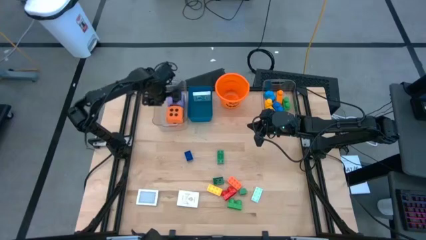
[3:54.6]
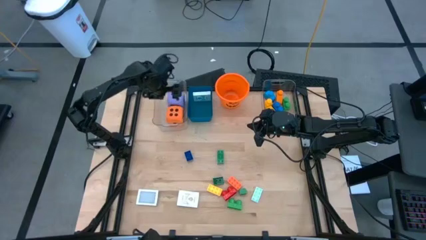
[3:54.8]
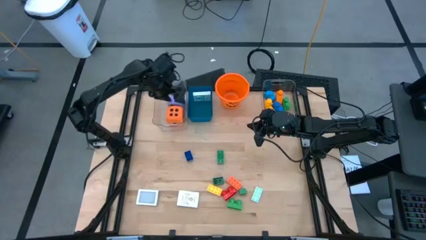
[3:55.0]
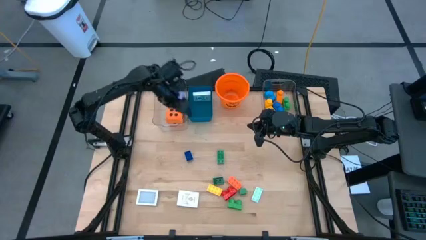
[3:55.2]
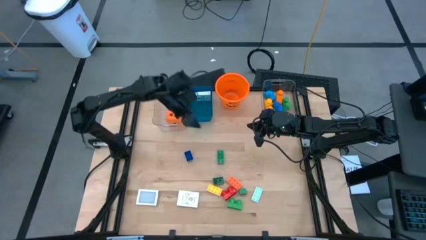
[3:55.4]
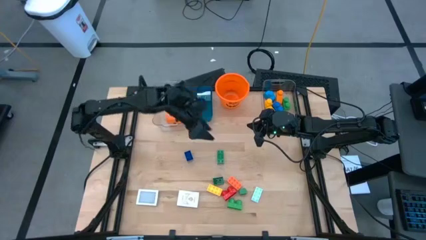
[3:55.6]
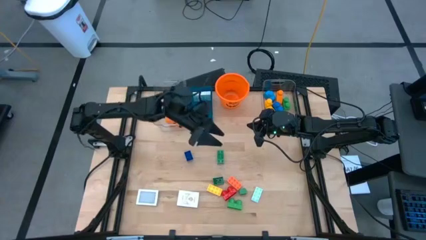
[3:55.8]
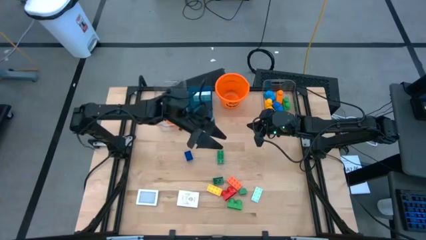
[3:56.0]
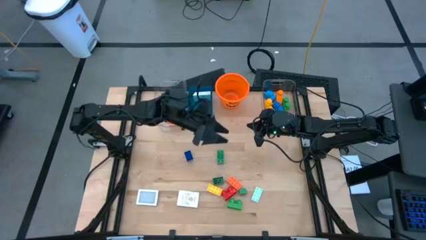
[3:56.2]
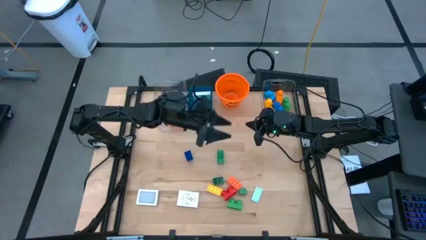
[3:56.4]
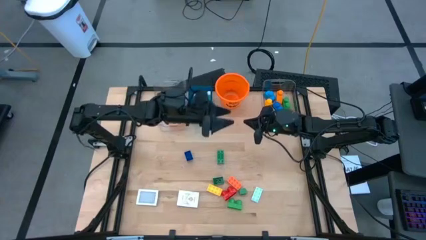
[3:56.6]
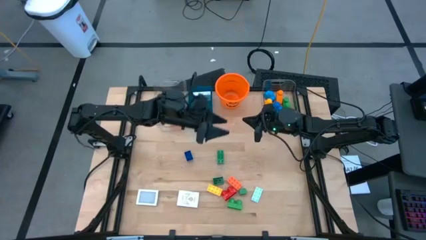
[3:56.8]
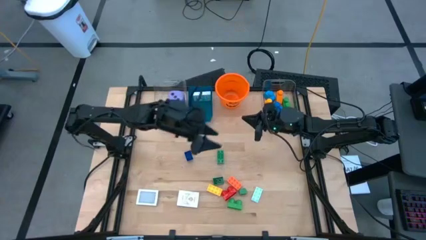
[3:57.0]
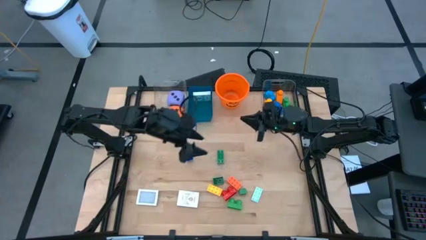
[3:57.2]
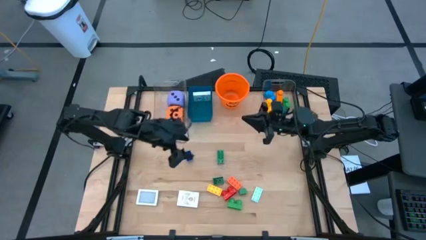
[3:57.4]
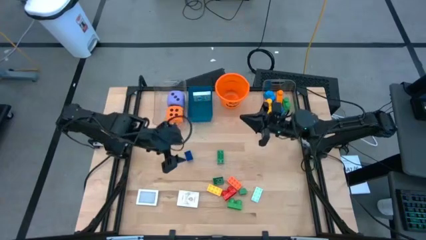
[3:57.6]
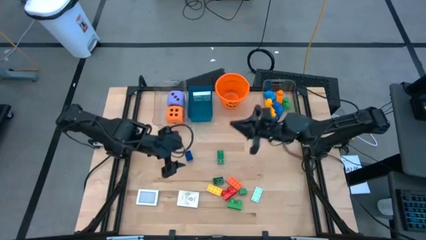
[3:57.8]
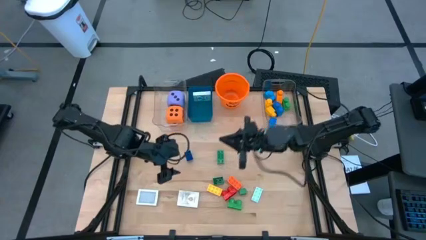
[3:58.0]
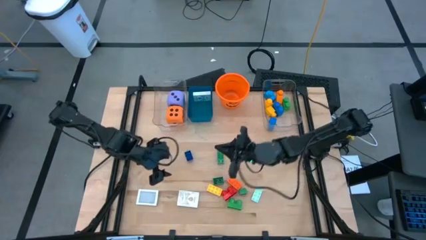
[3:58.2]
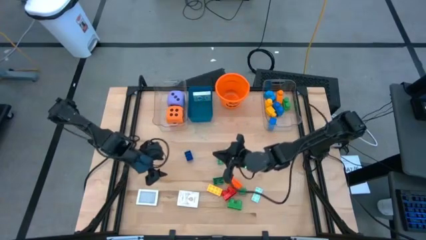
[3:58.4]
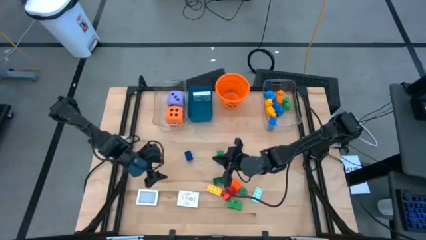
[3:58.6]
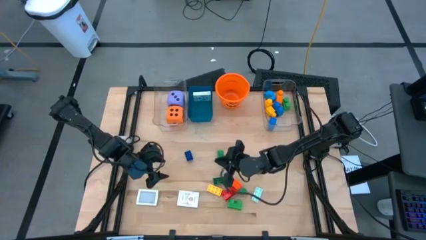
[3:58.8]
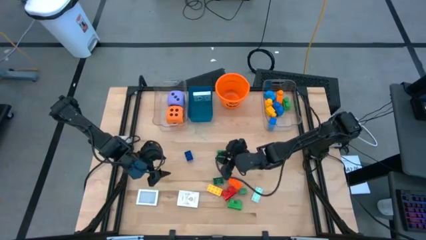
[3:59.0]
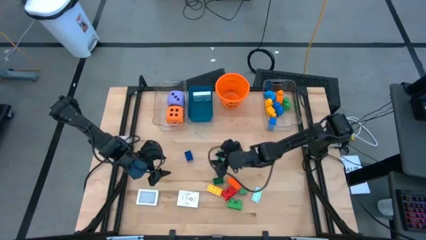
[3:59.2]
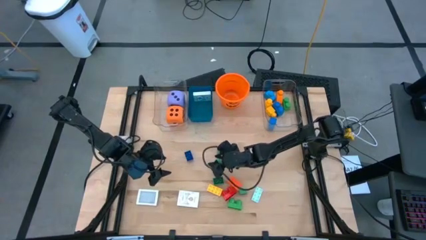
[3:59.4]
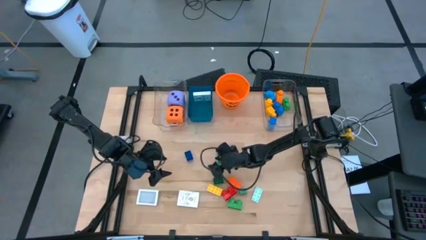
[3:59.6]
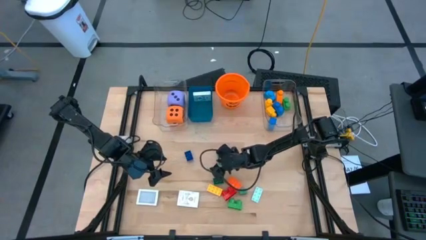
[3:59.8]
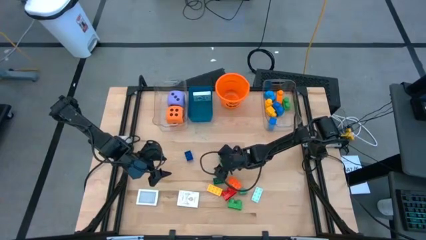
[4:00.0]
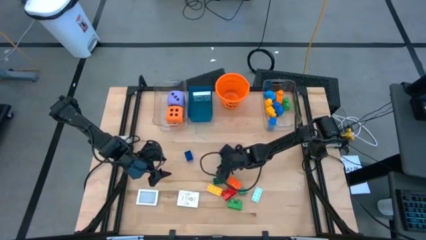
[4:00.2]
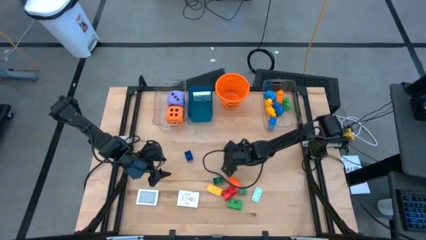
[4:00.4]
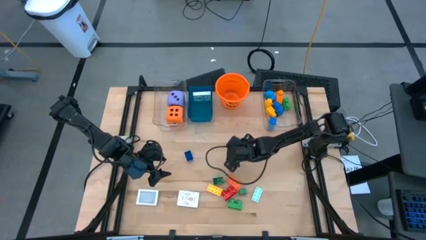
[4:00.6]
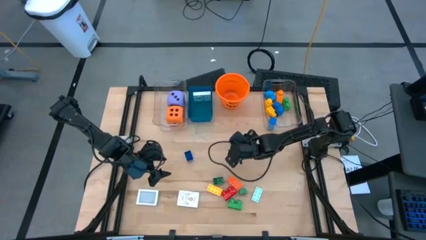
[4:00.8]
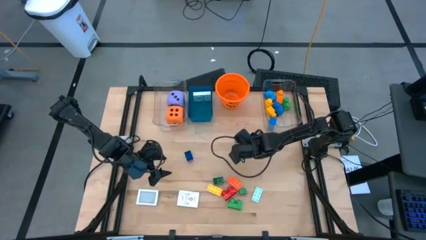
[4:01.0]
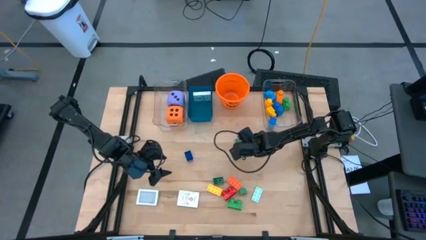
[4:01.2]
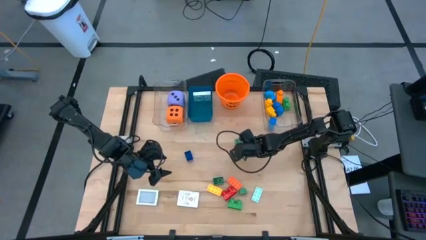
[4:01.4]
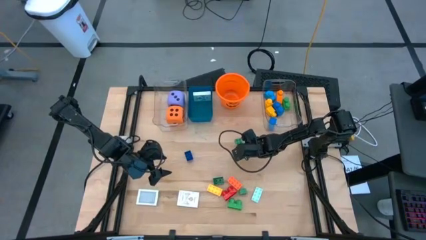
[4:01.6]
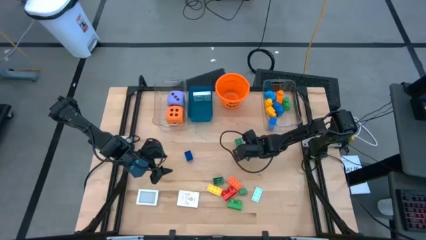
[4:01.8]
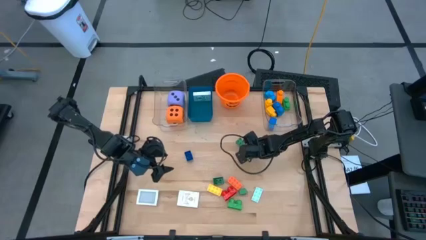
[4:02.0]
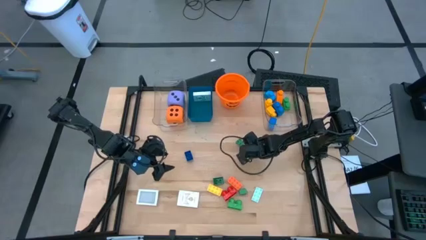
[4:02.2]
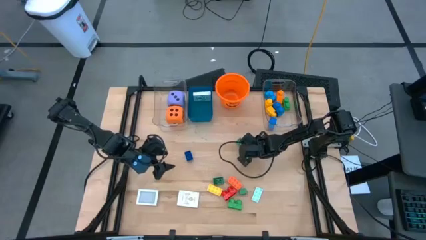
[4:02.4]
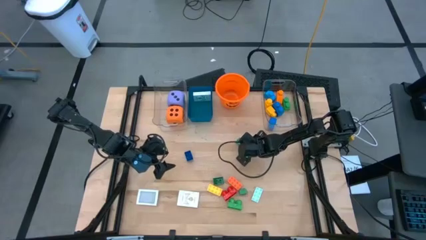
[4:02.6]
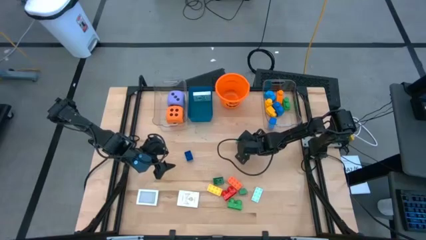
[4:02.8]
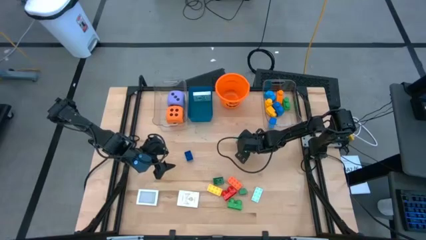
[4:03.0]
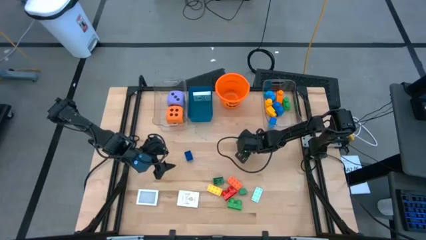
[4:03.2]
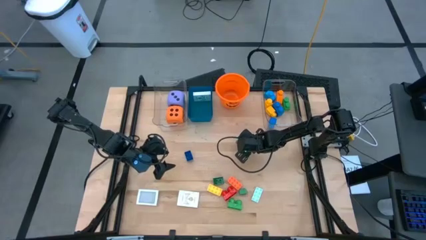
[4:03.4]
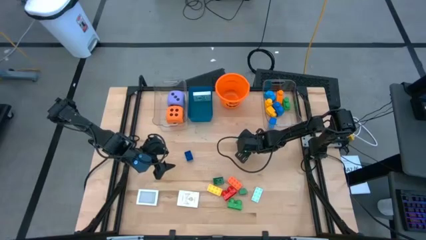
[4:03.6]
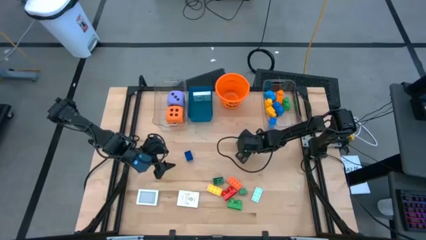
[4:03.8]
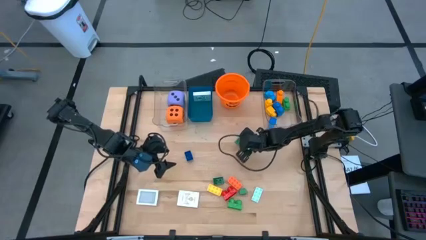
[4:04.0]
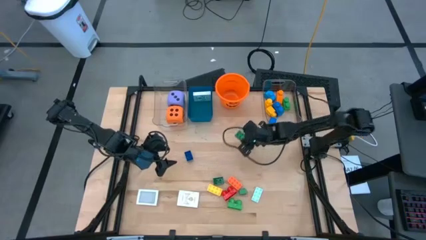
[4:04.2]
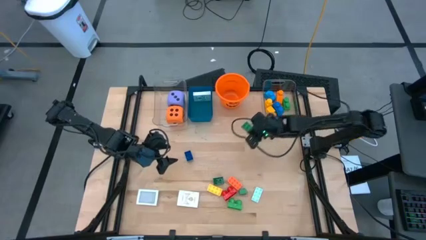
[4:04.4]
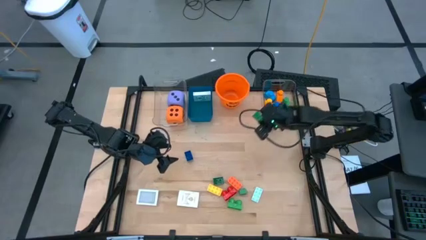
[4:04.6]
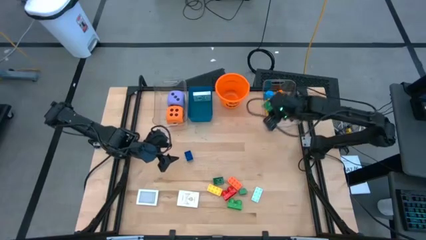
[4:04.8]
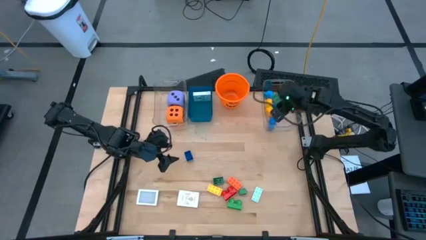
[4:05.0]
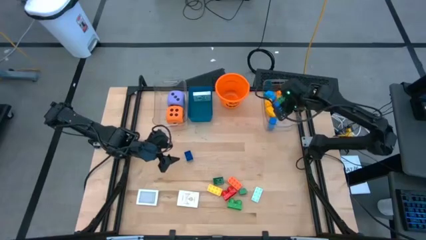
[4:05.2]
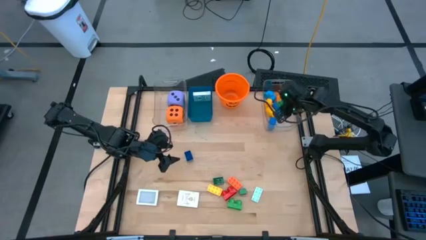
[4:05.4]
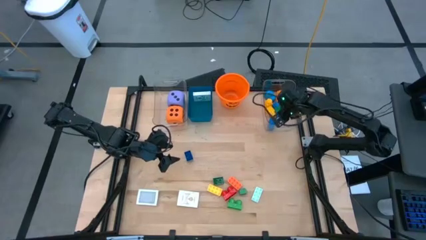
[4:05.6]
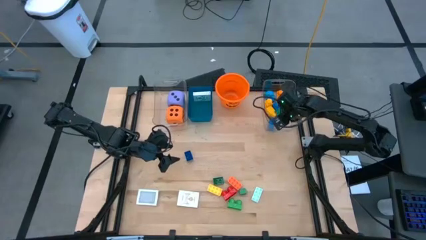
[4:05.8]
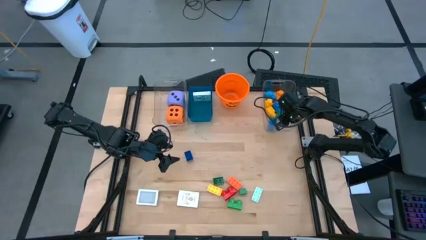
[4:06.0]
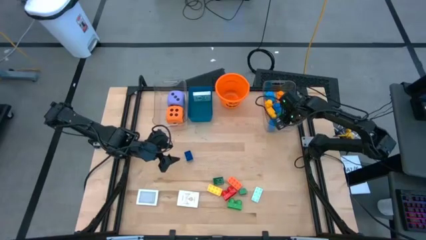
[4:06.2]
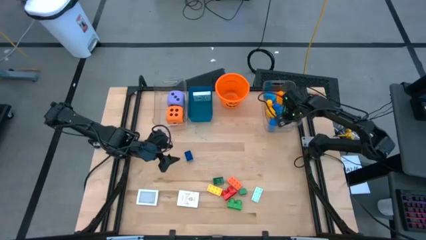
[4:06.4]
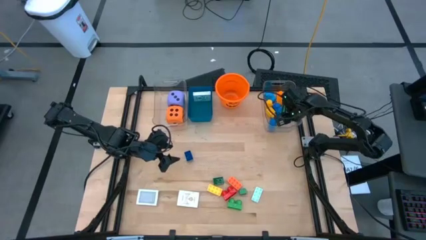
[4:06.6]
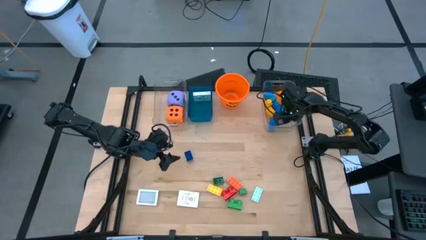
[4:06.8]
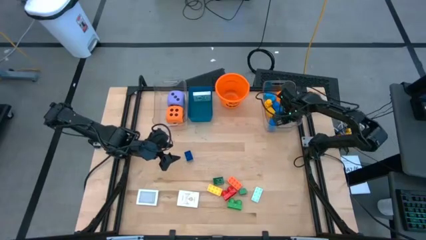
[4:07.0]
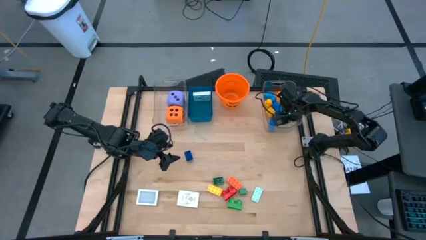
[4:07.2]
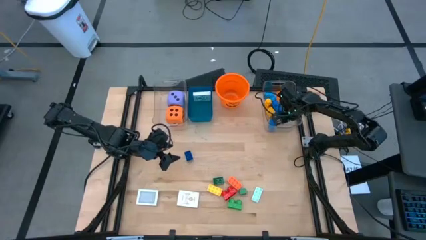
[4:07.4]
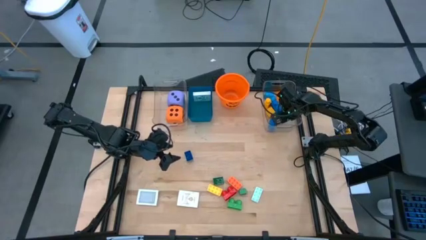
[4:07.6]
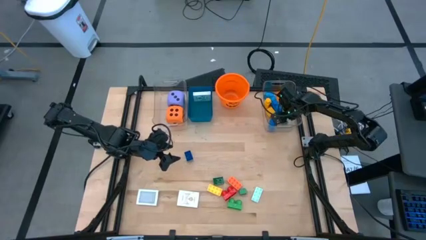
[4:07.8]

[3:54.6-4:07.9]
Task: Pick & Place Toys
Put the green game piece into the right transparent bin
